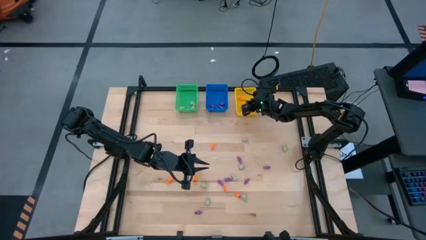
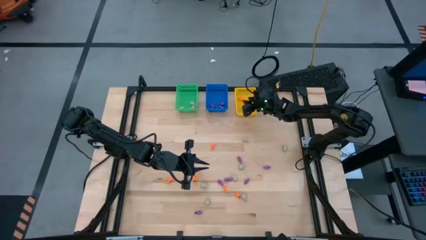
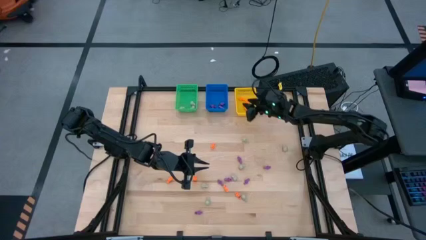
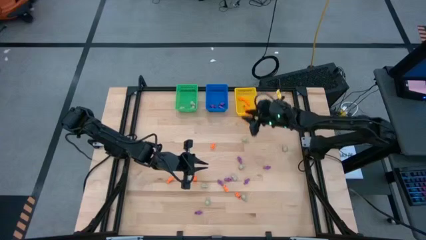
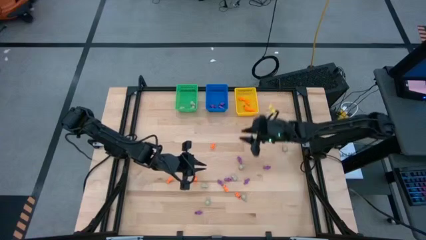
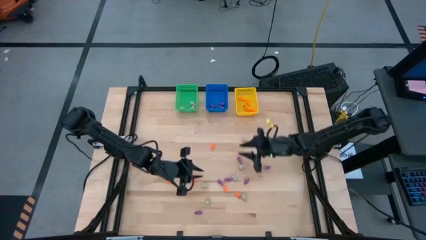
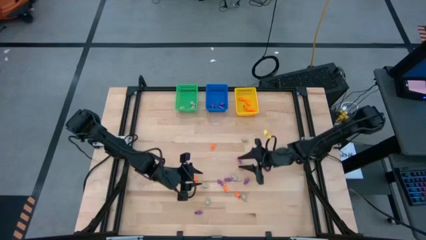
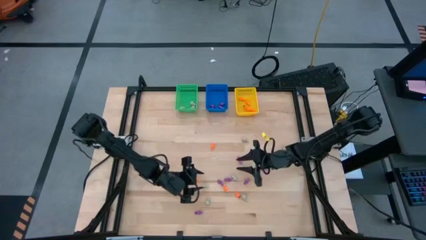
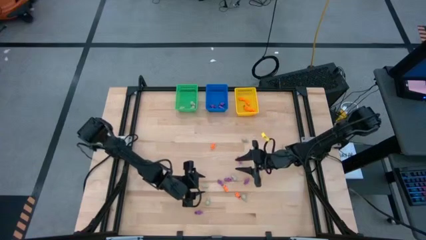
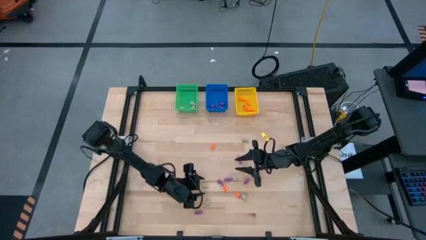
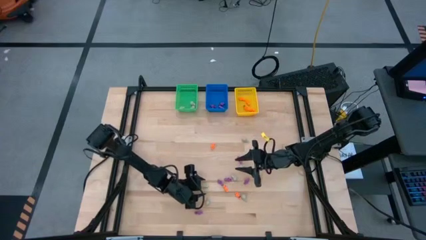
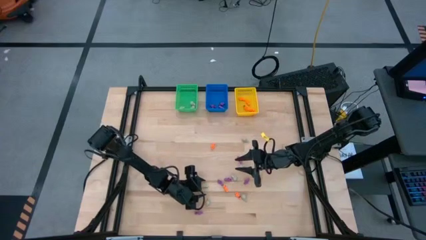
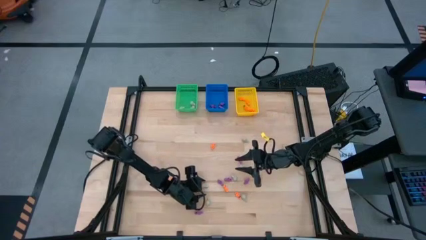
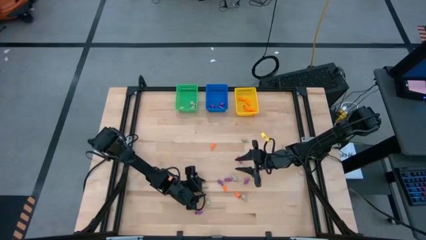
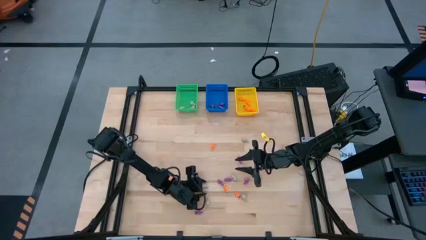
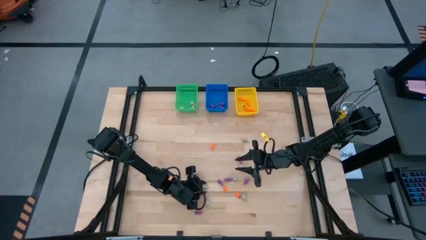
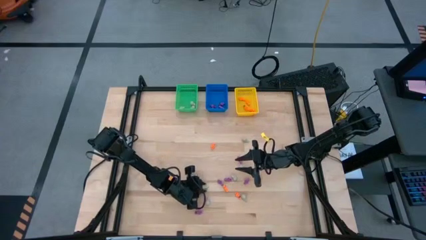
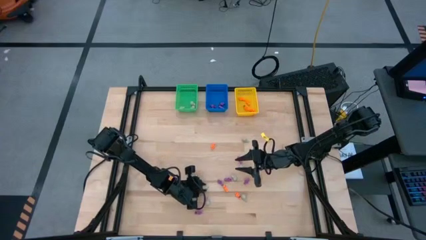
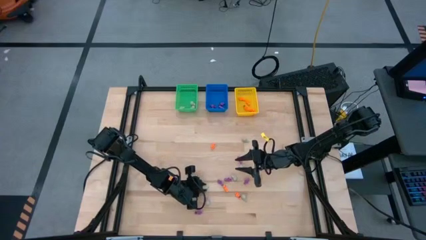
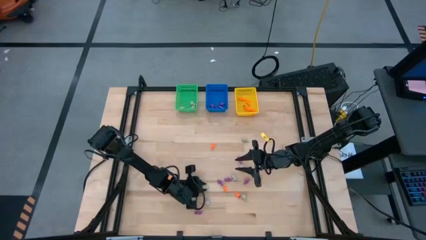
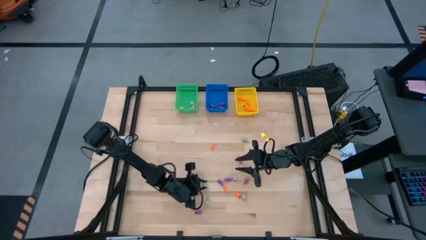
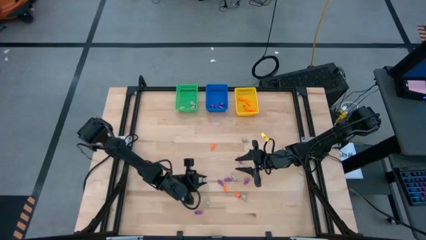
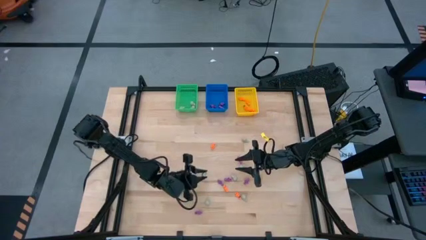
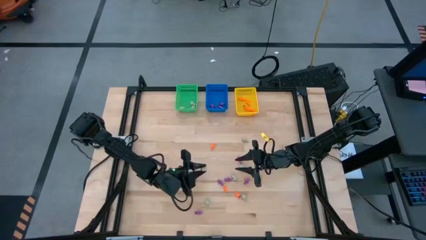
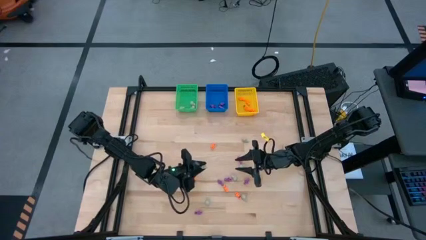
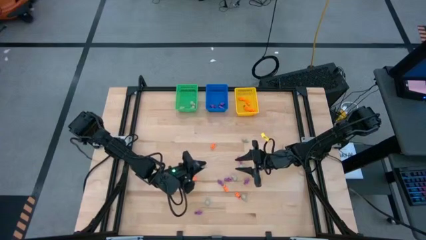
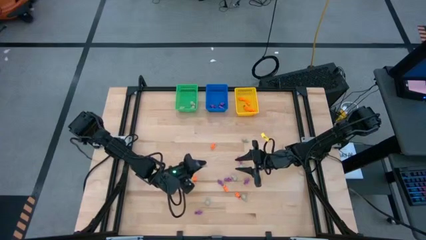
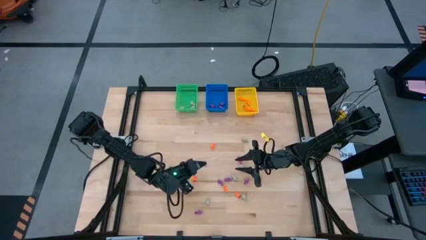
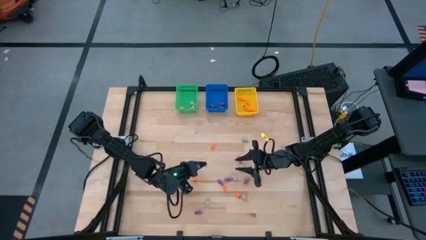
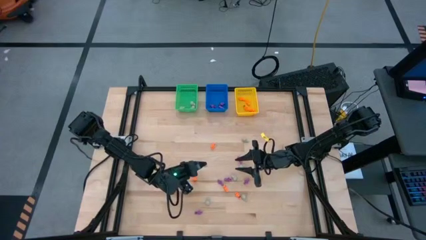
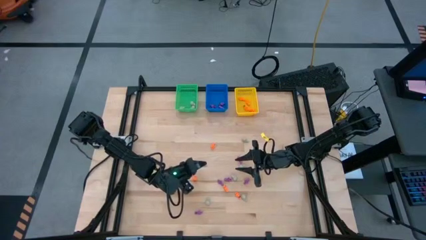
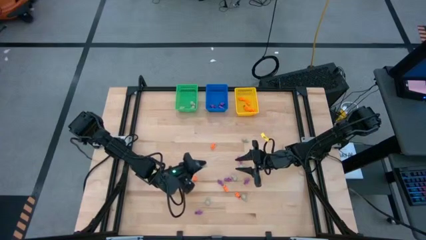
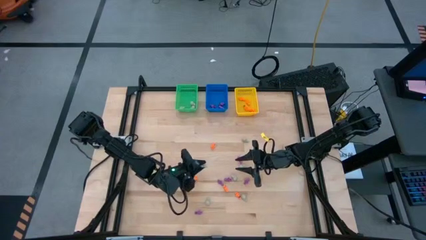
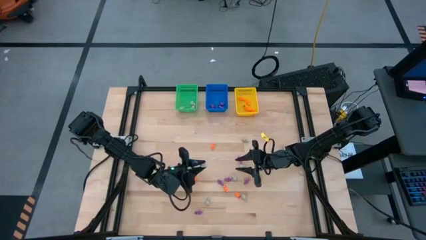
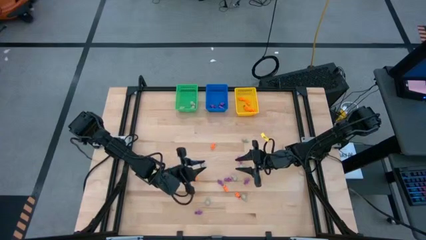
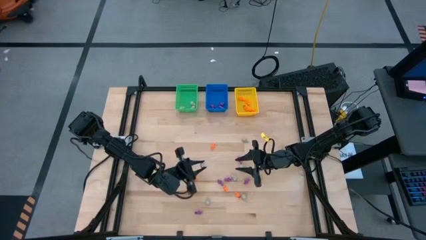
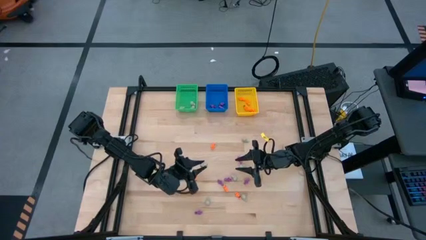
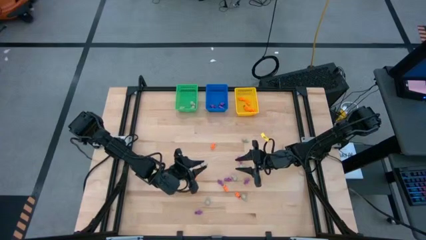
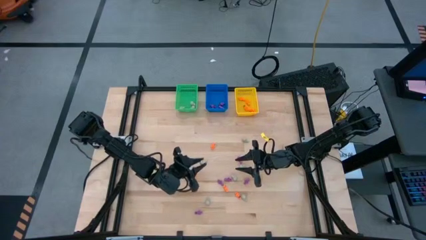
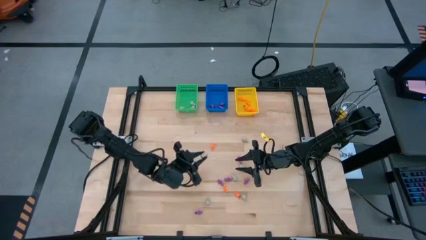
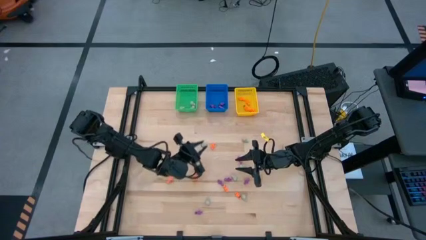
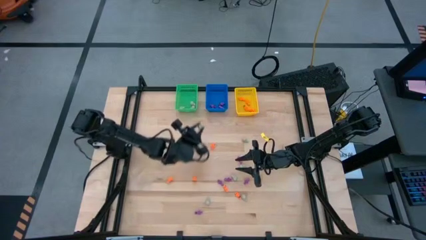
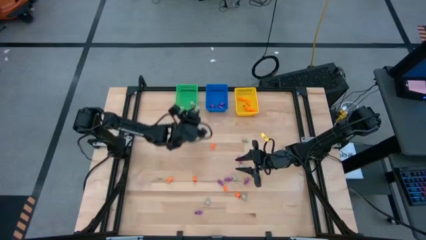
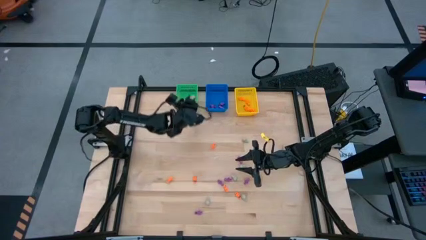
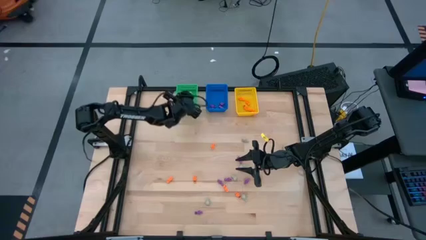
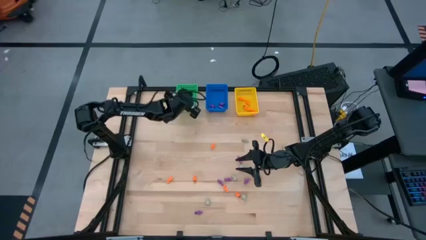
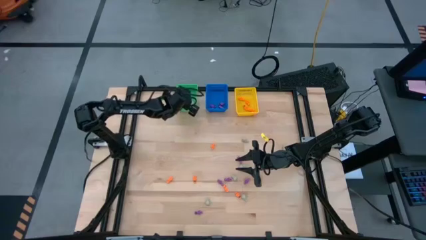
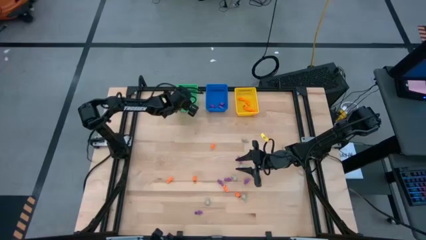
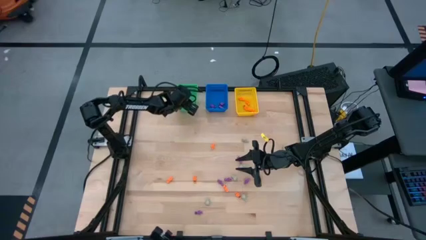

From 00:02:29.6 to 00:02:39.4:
Task: Sort Halloween decoration
Put the gray skull toy into the green bin

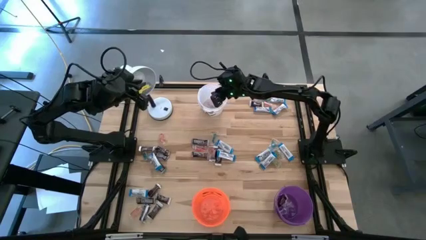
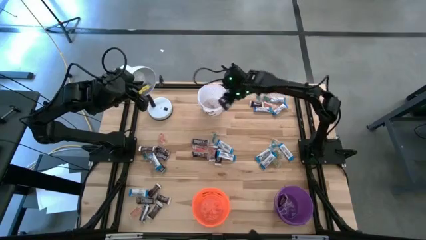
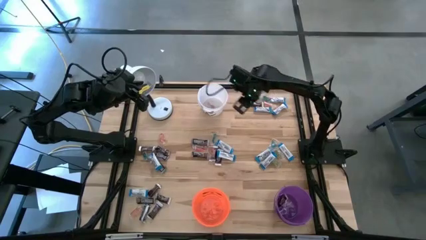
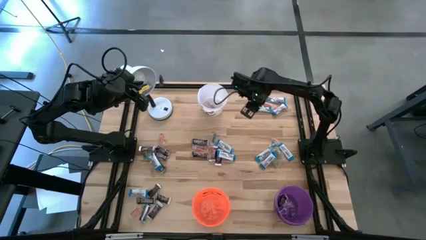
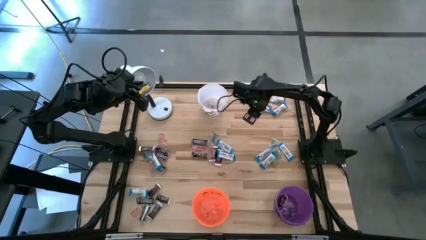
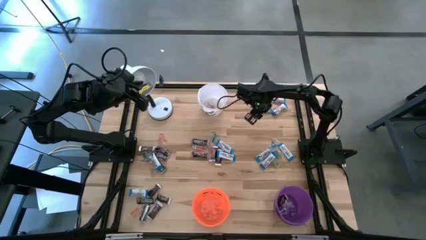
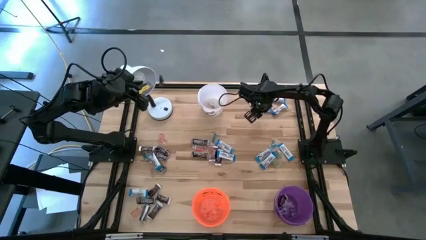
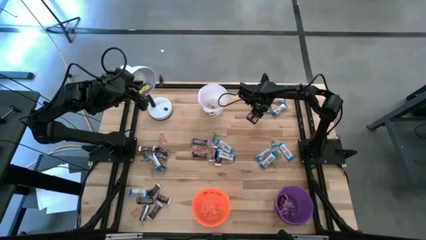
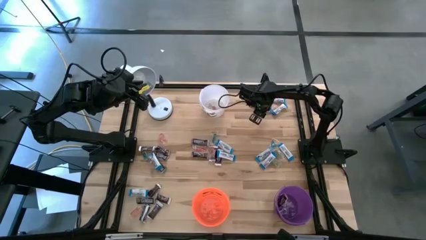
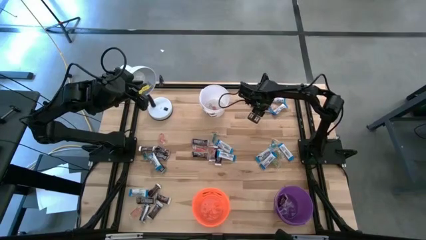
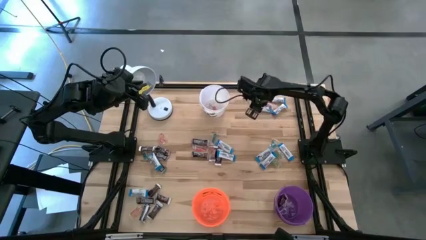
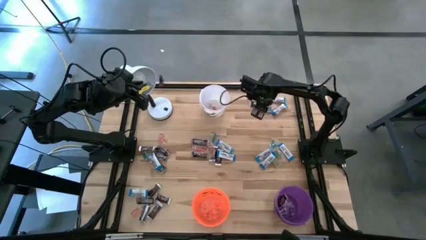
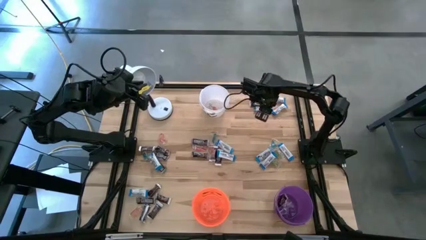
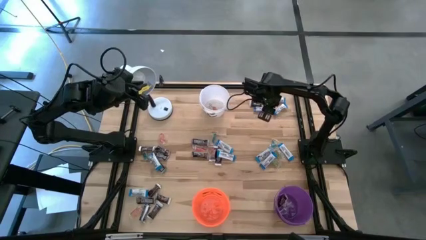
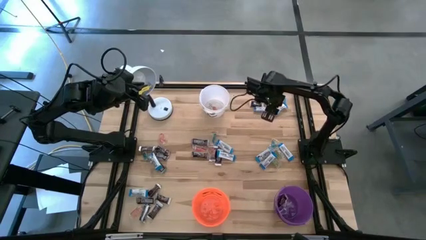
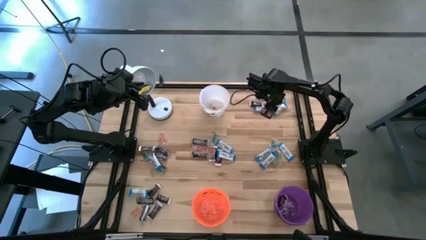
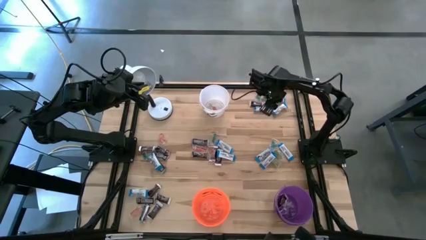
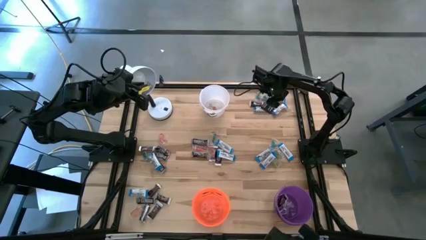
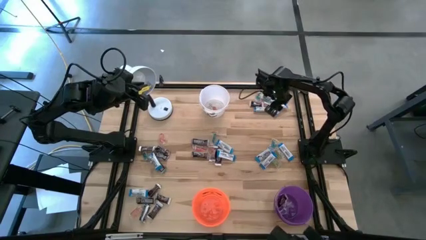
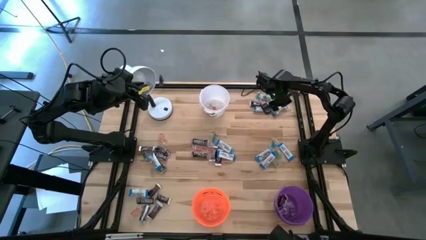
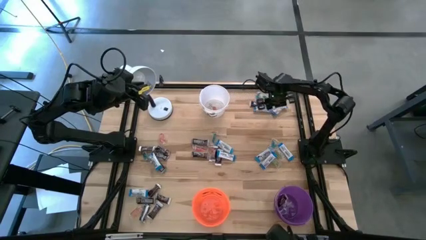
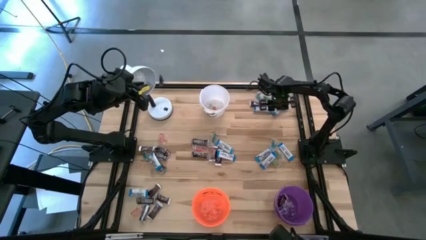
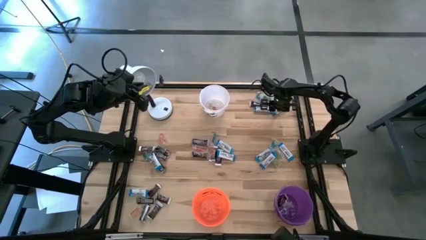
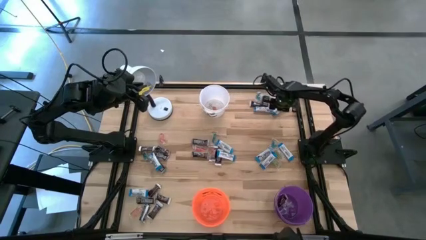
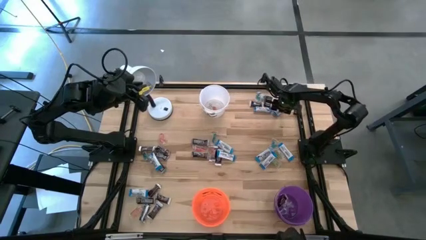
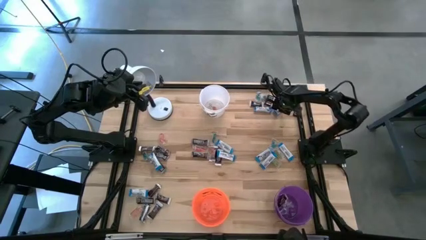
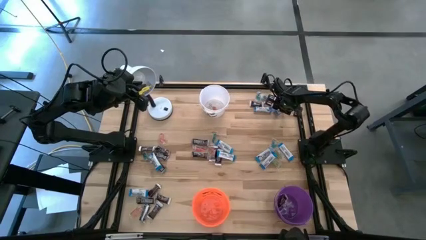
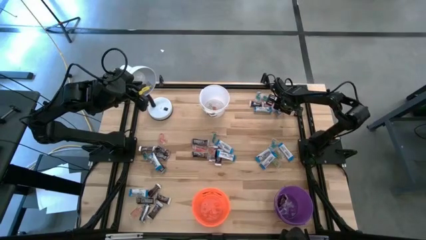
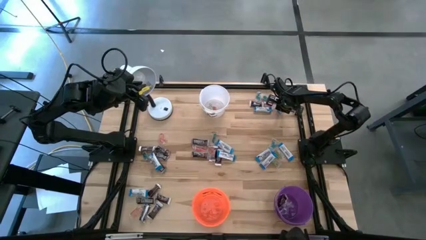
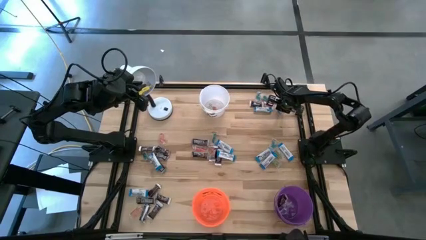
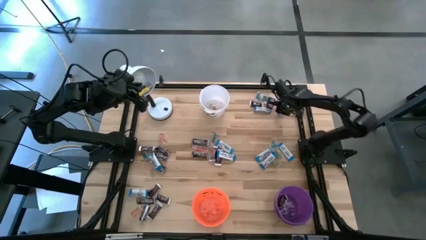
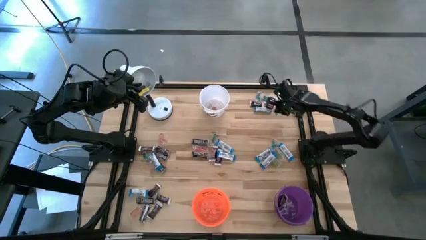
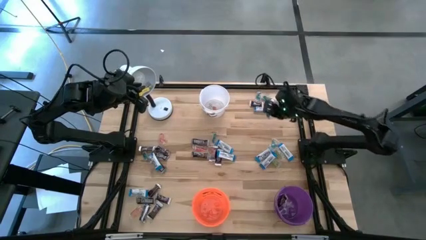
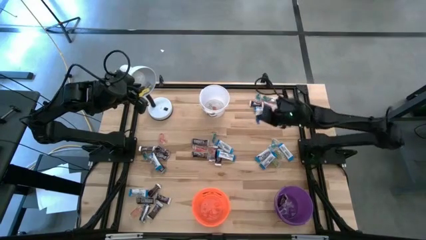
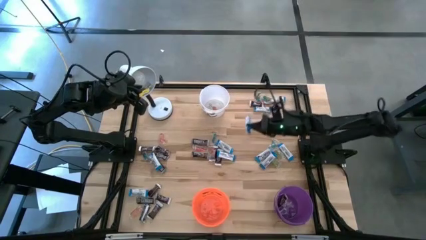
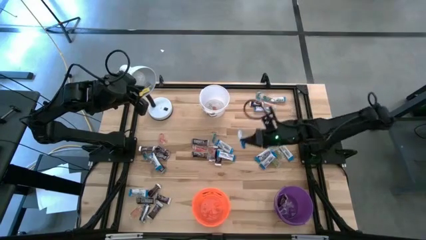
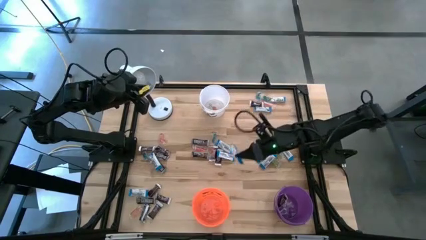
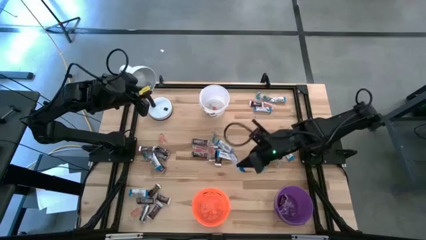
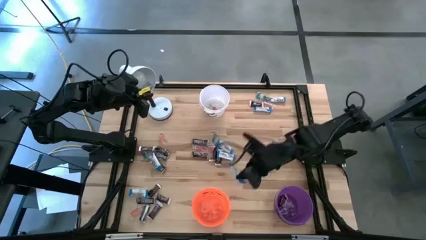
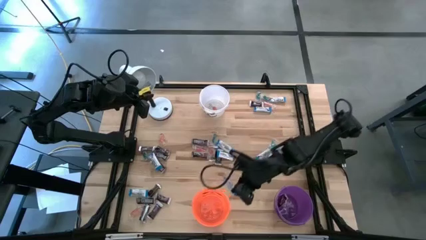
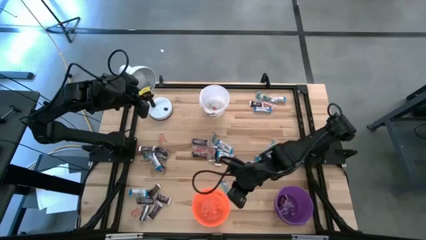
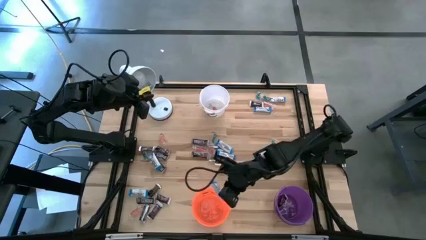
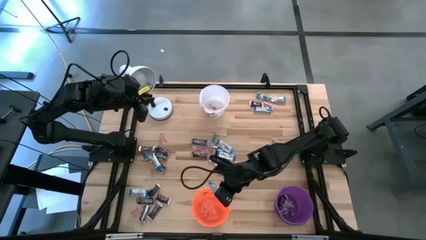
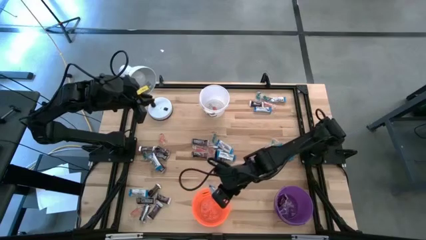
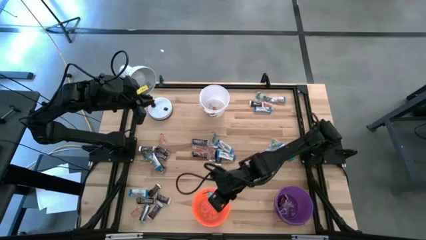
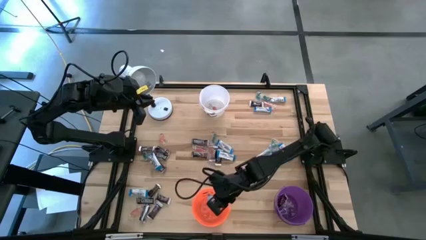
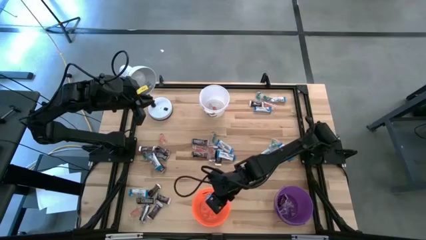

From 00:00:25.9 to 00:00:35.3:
Task: Organize candy in baskets
Put the white chocolate bar into the orange bucket
